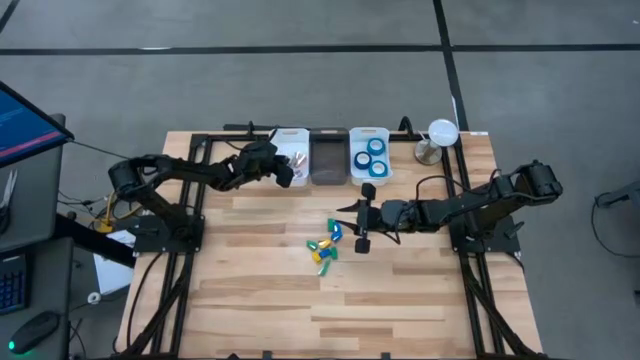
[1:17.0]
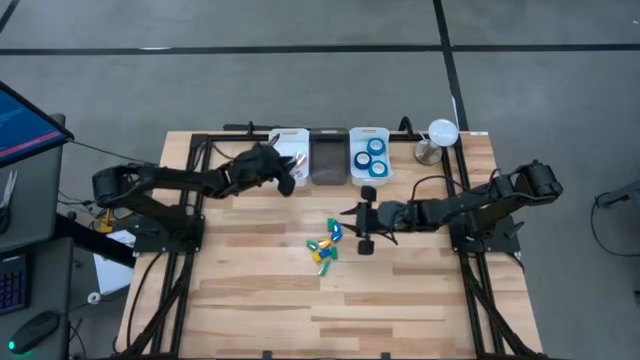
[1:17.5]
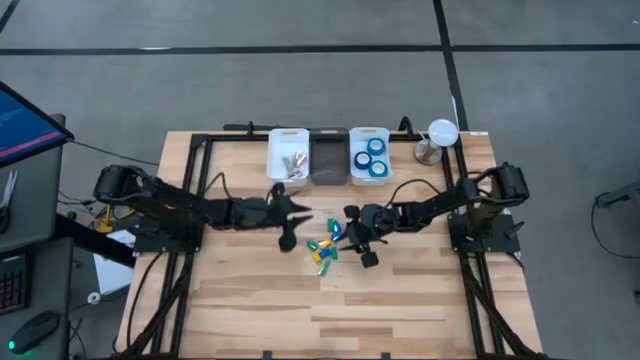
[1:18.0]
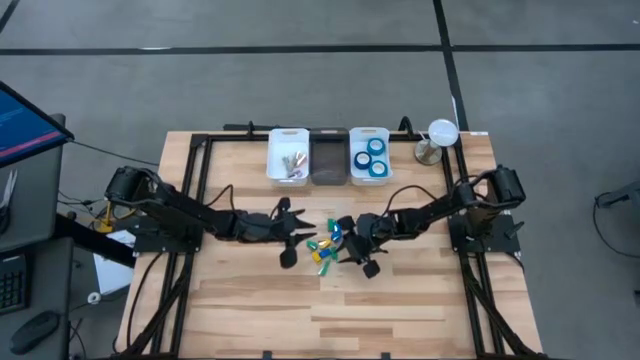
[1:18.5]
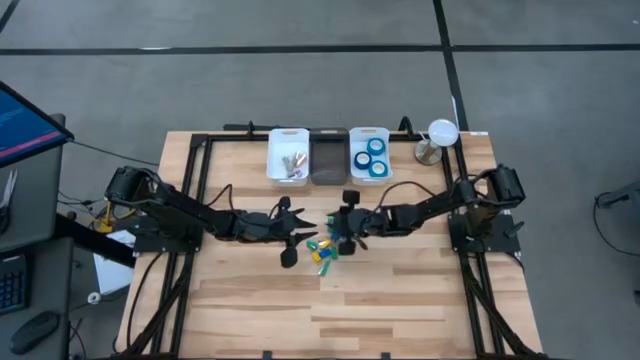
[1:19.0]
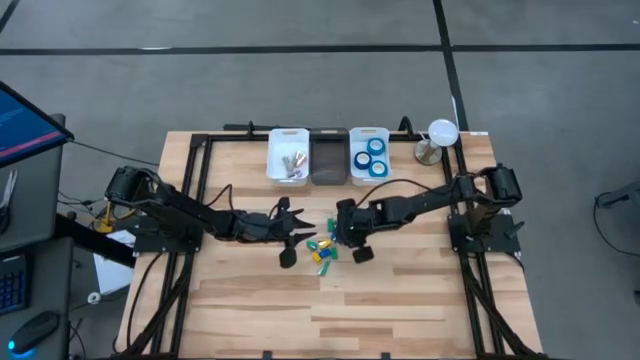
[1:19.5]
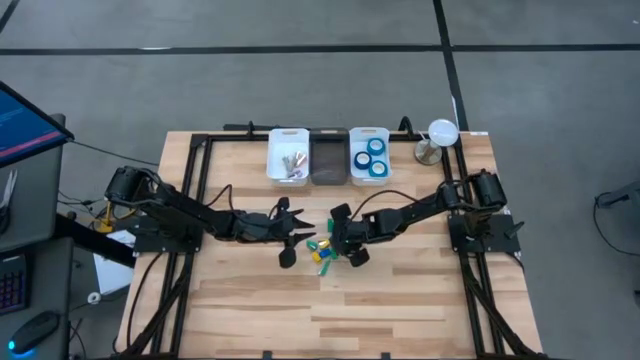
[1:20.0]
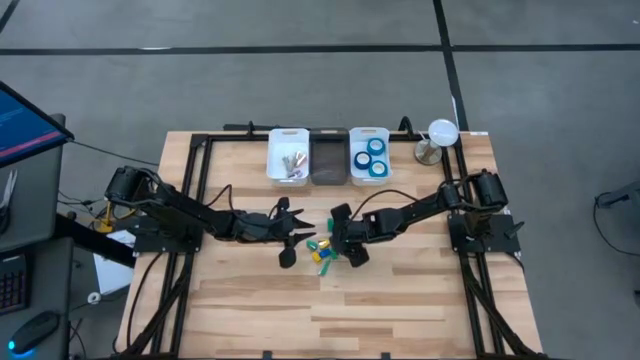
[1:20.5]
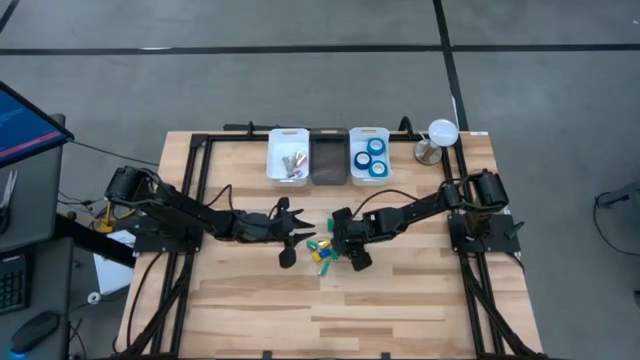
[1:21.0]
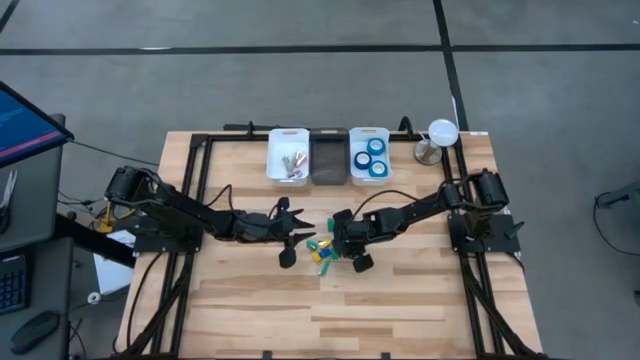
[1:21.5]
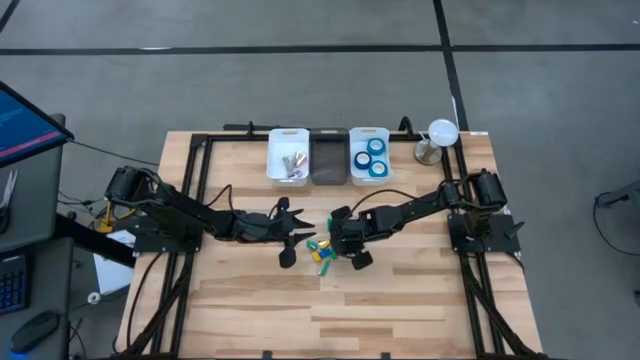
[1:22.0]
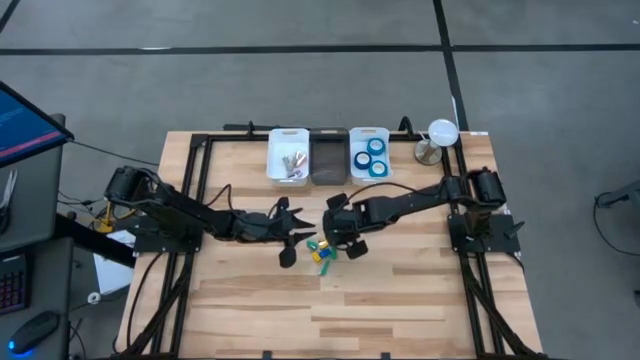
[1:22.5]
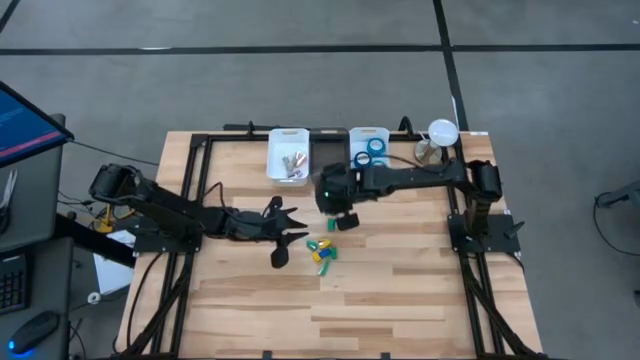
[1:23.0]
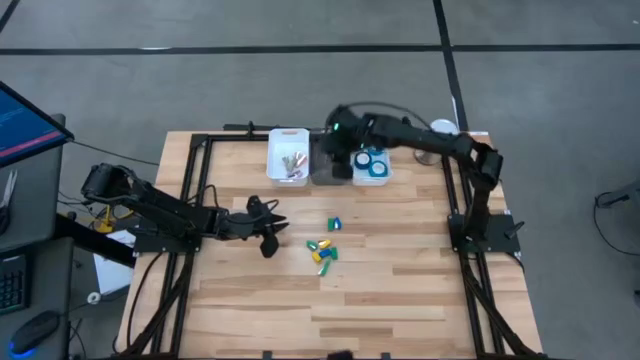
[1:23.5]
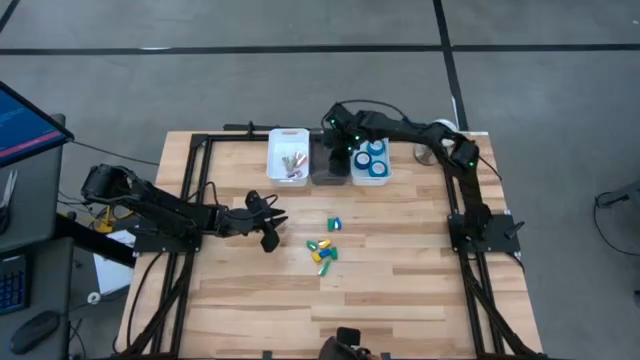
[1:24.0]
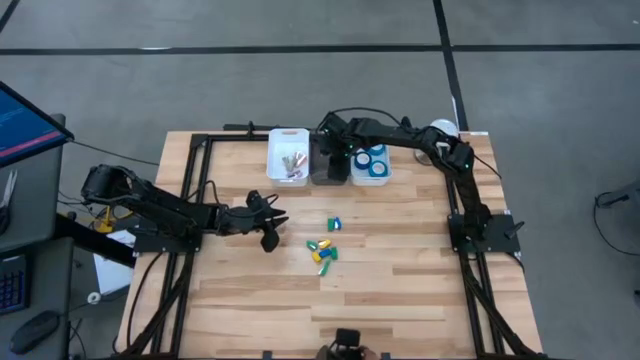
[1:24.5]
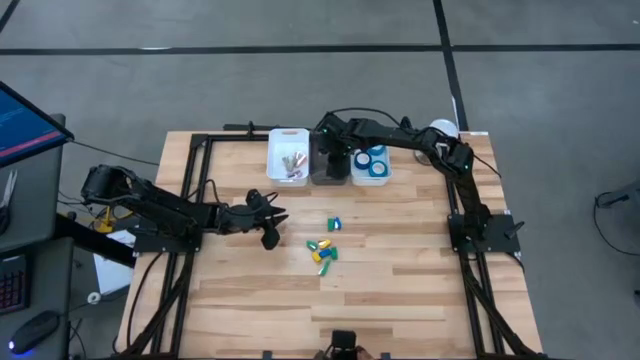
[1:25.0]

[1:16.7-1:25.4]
Task: Pick and place Stapler, Stapler remover, tape
Put the blue stapler into the black bin

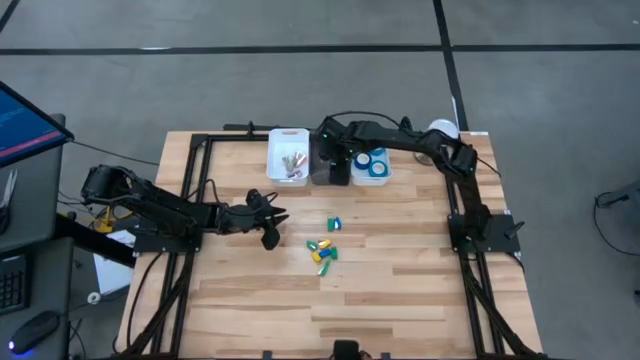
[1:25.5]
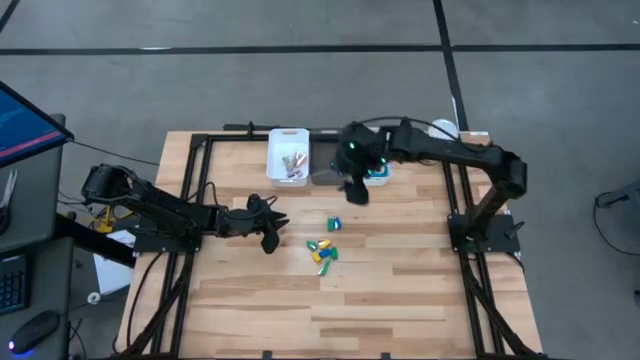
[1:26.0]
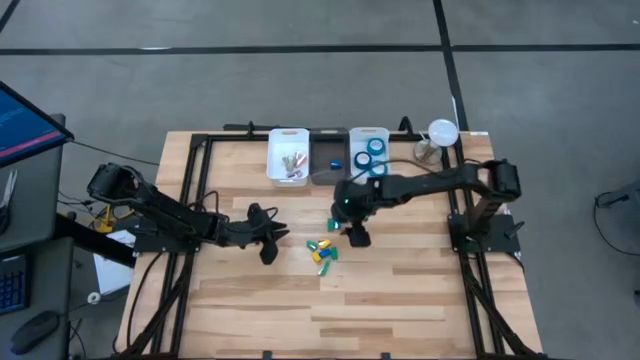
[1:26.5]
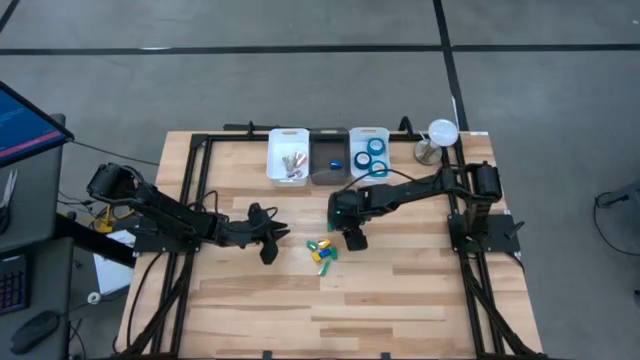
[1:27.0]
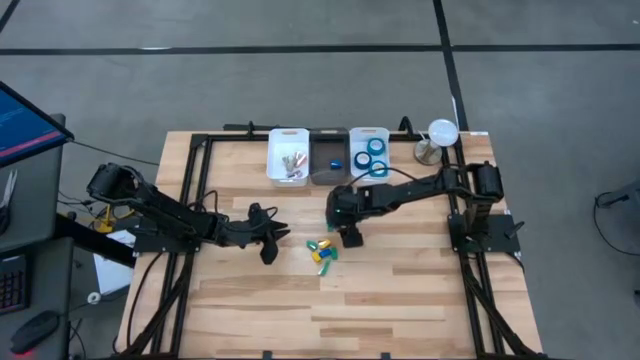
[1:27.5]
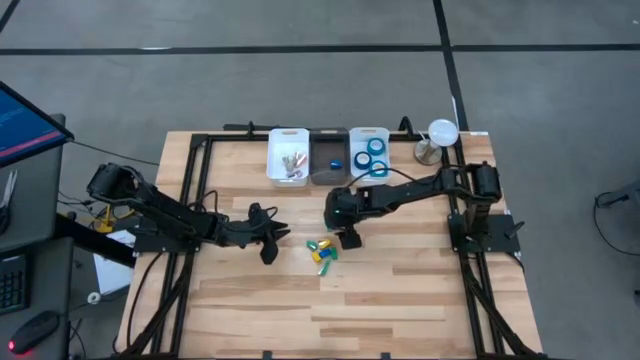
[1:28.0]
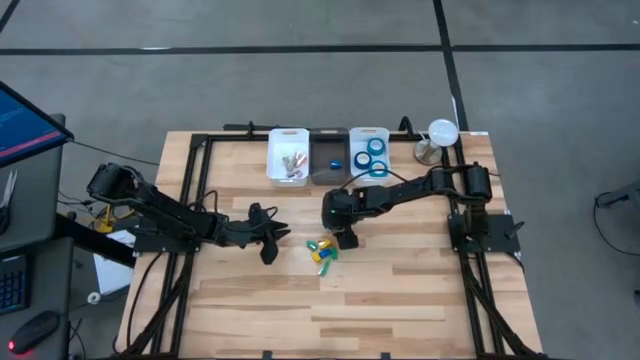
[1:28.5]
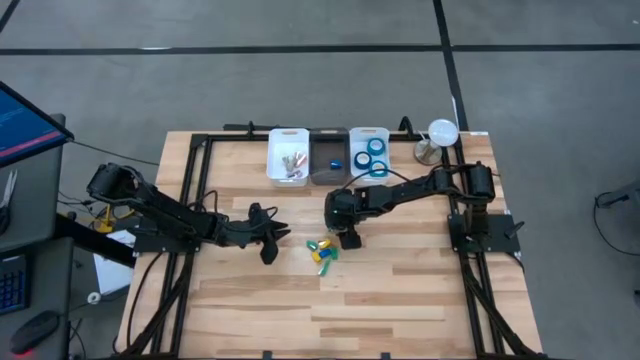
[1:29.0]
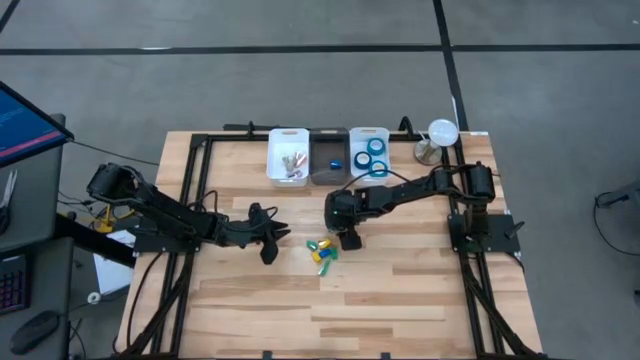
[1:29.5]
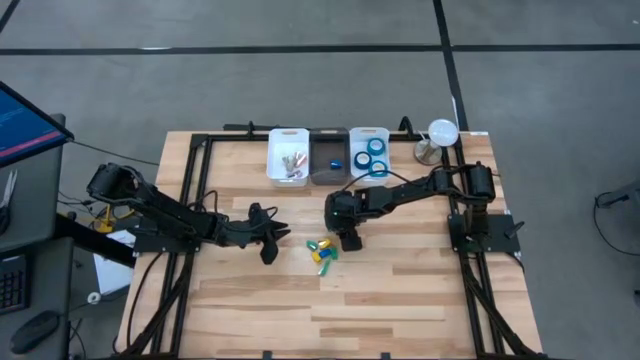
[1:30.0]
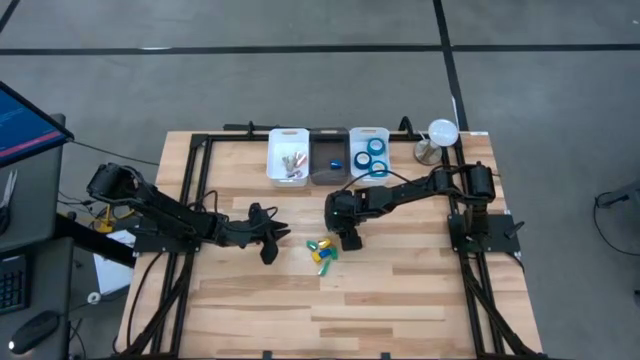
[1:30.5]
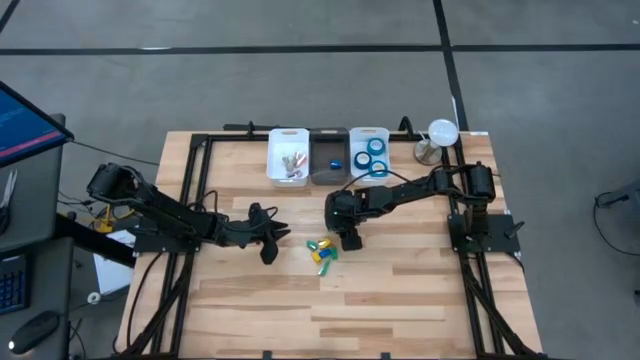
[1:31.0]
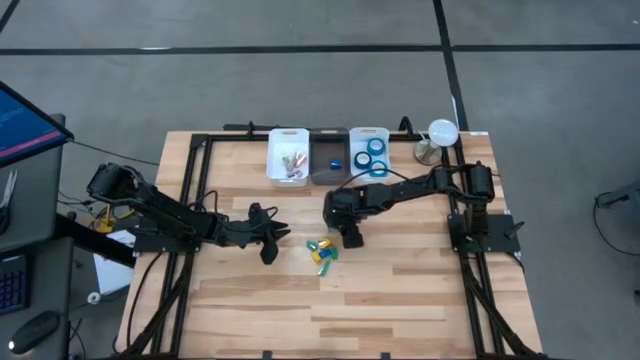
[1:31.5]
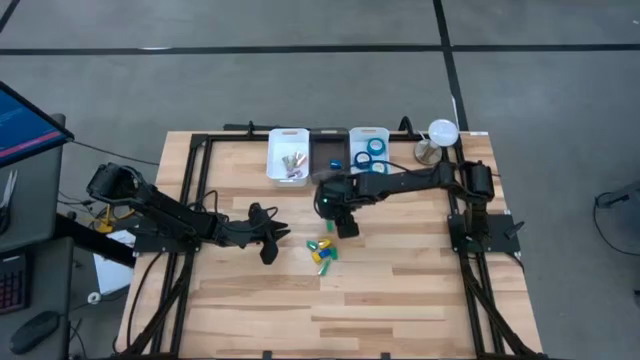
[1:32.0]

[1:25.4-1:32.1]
Put the blue stapler into the black bin

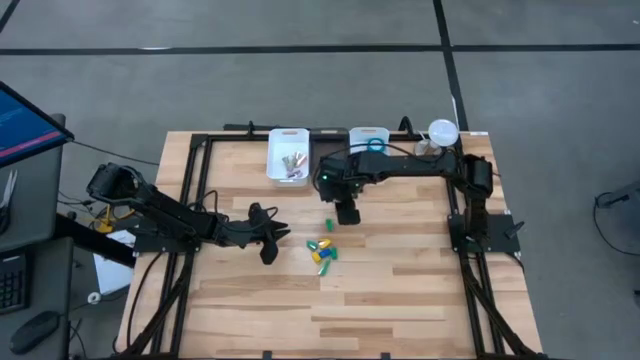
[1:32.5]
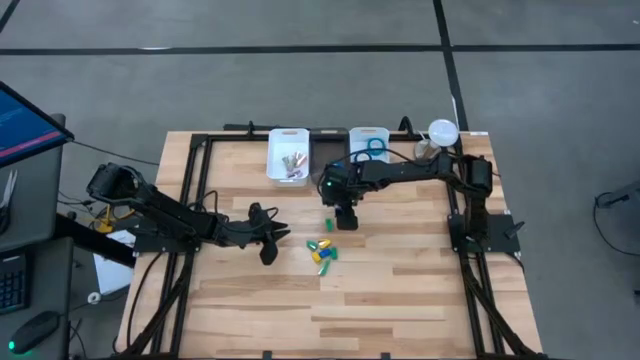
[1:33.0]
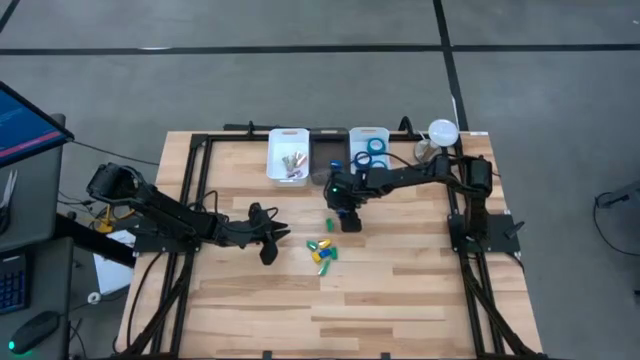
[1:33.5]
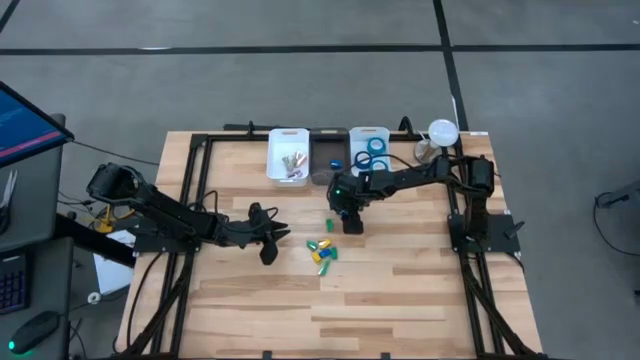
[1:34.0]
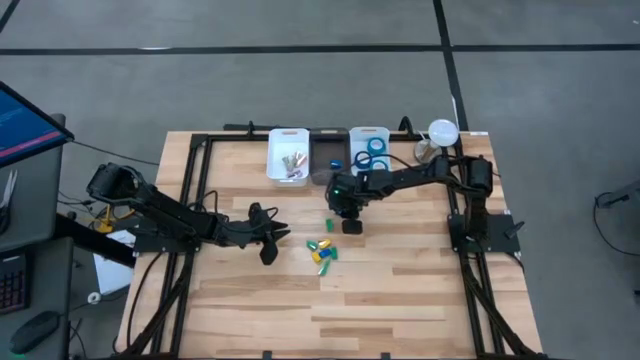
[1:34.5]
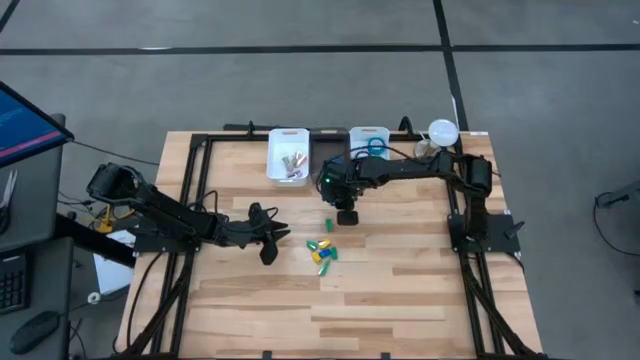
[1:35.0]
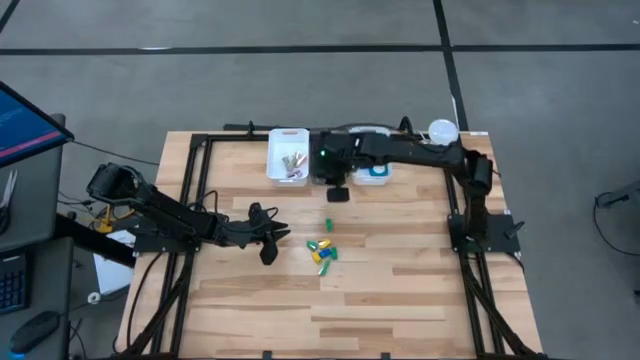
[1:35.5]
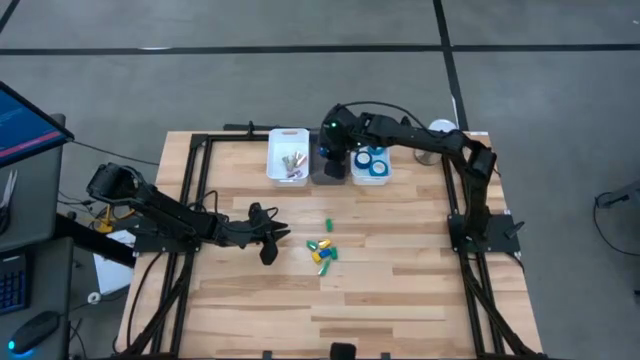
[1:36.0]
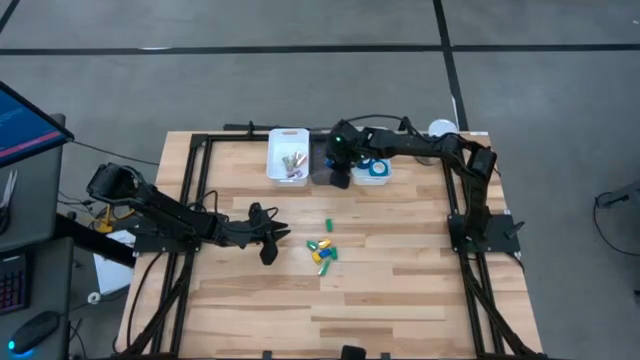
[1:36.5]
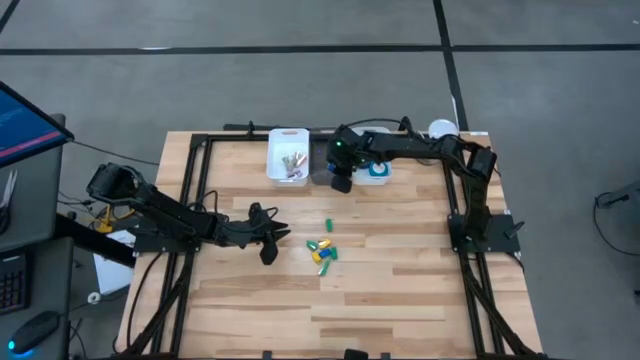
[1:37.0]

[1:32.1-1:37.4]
Put the blue stapler into the black bin
